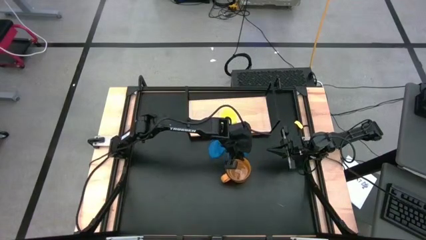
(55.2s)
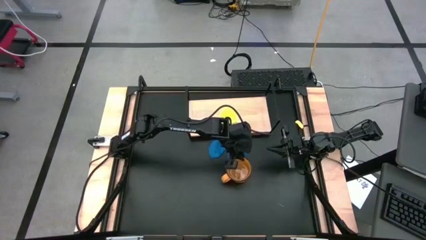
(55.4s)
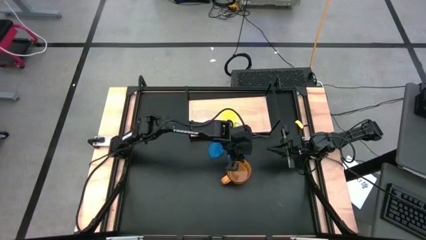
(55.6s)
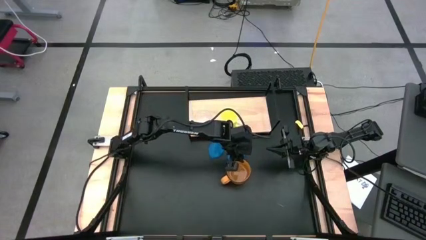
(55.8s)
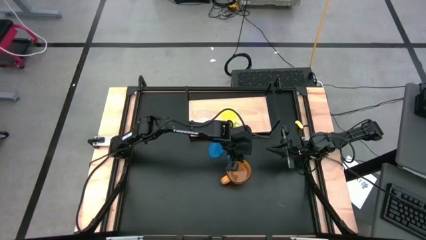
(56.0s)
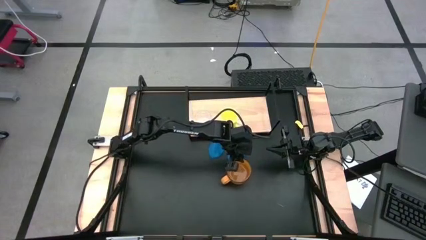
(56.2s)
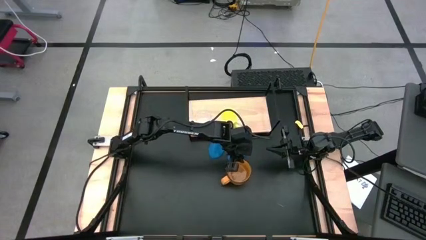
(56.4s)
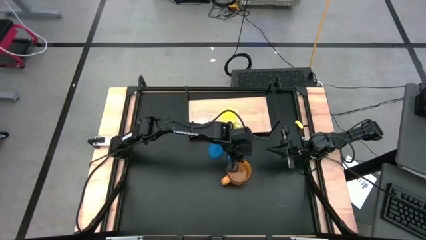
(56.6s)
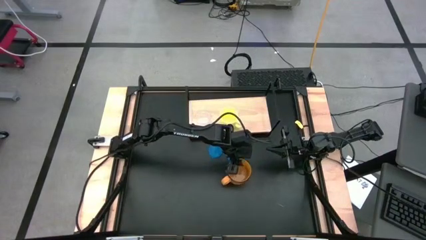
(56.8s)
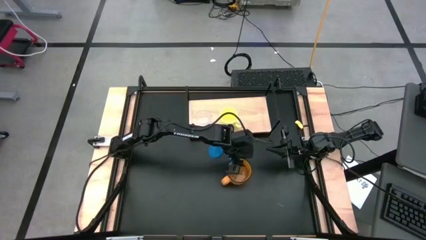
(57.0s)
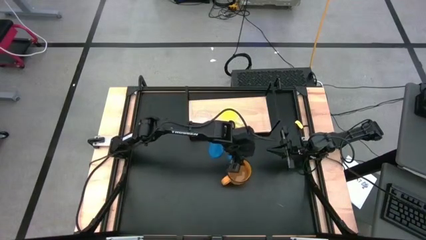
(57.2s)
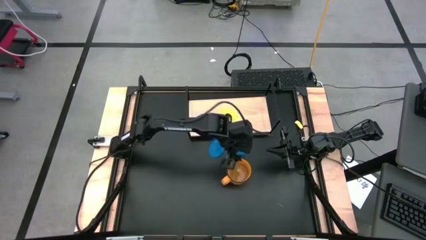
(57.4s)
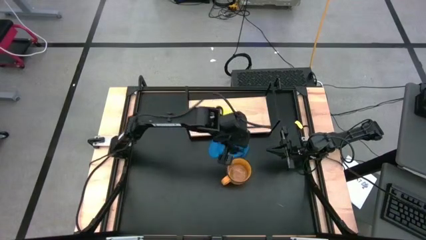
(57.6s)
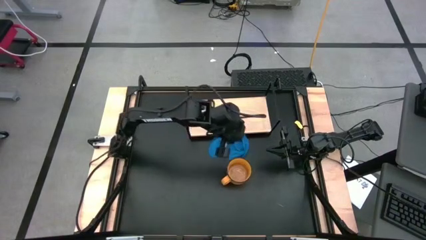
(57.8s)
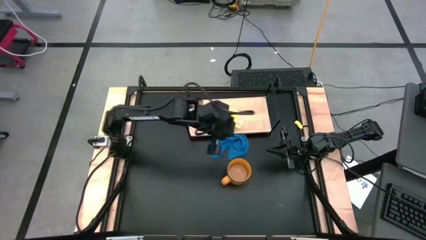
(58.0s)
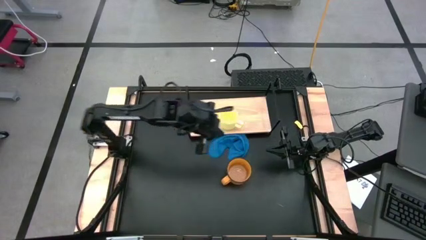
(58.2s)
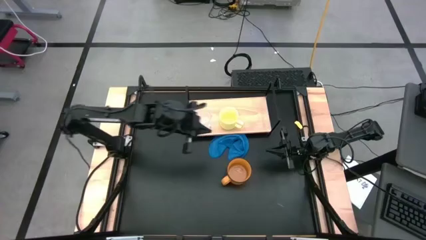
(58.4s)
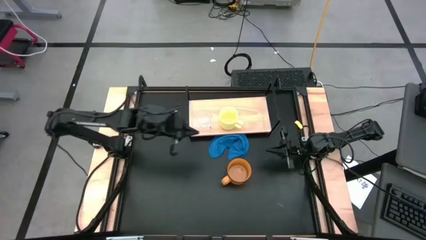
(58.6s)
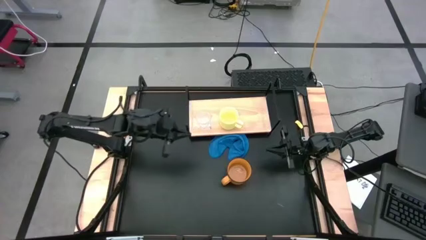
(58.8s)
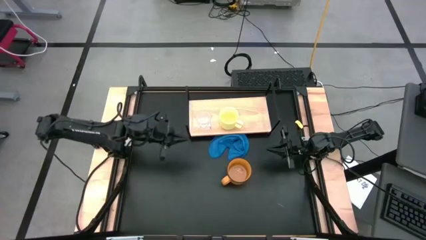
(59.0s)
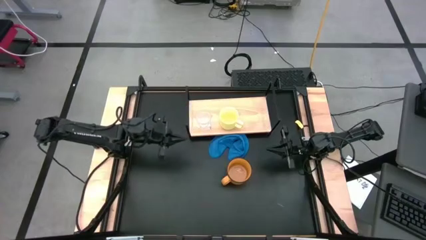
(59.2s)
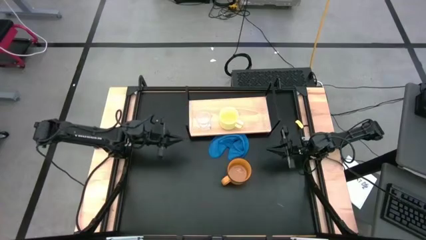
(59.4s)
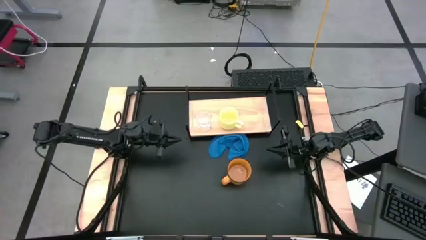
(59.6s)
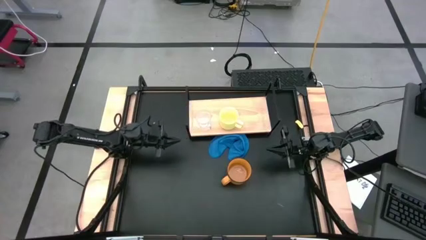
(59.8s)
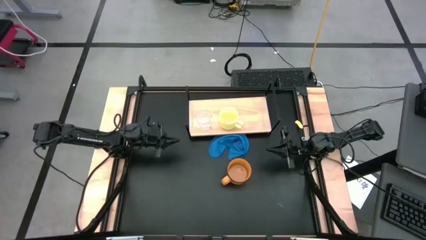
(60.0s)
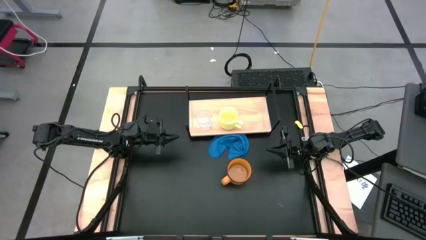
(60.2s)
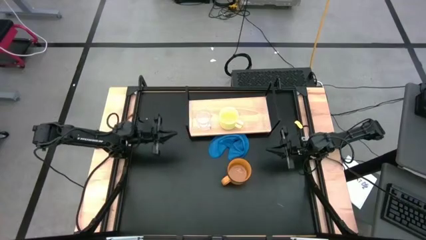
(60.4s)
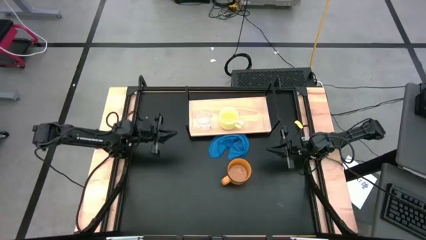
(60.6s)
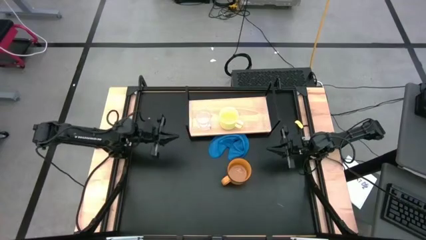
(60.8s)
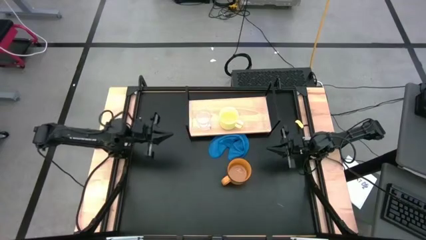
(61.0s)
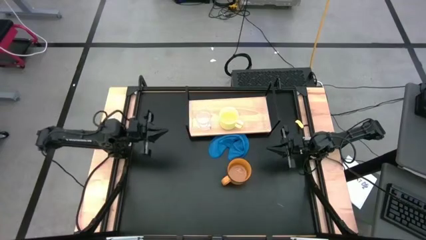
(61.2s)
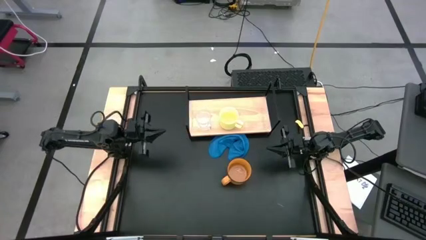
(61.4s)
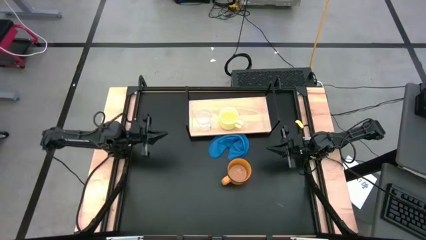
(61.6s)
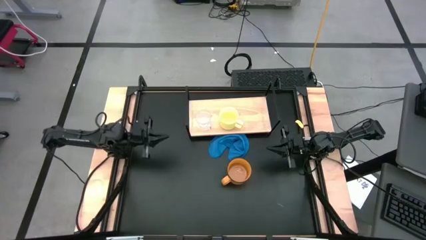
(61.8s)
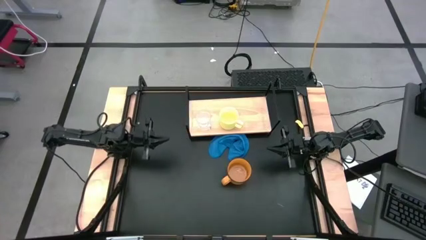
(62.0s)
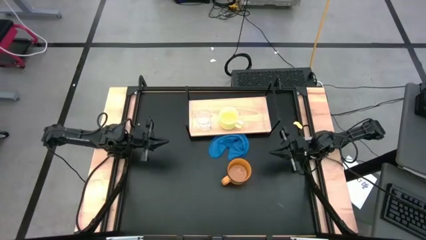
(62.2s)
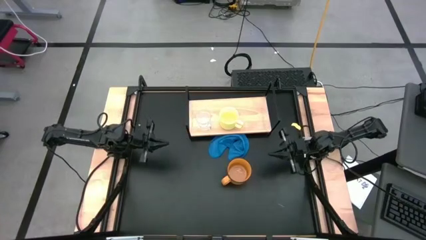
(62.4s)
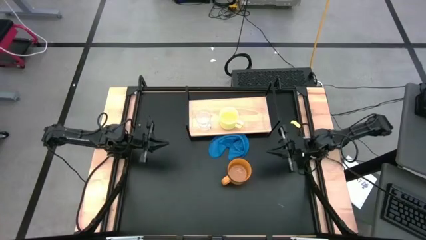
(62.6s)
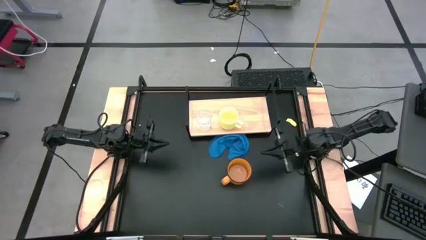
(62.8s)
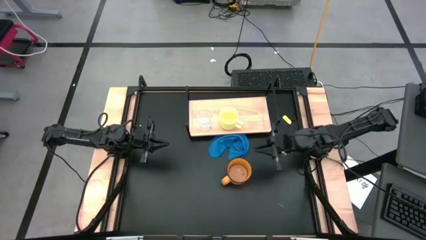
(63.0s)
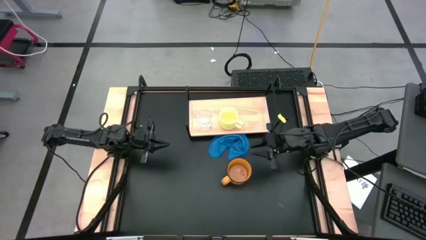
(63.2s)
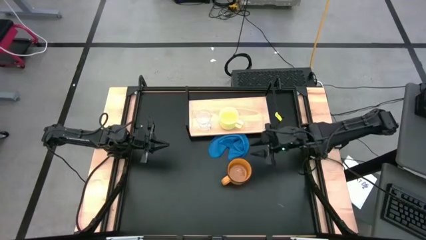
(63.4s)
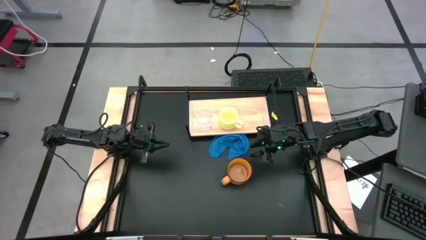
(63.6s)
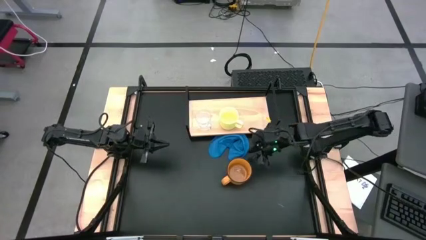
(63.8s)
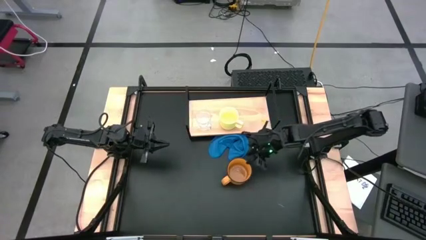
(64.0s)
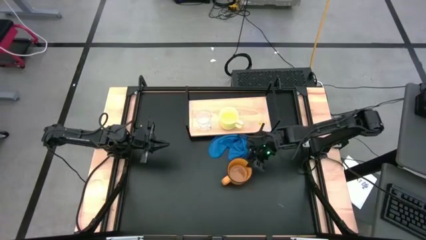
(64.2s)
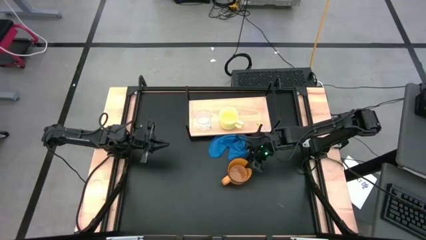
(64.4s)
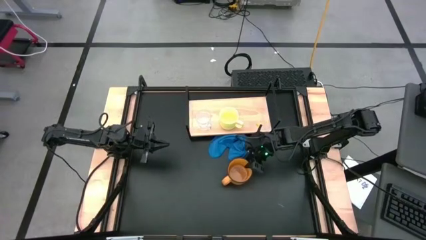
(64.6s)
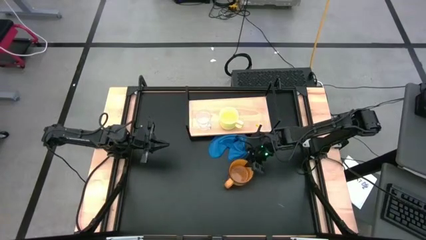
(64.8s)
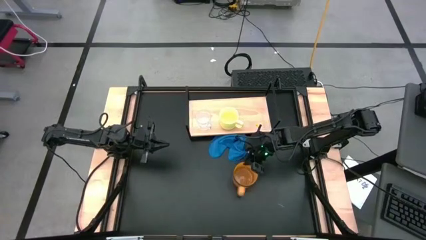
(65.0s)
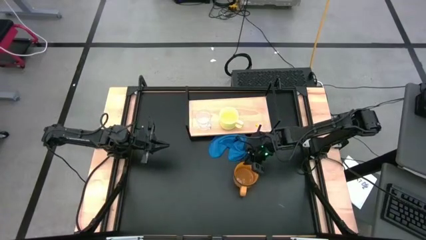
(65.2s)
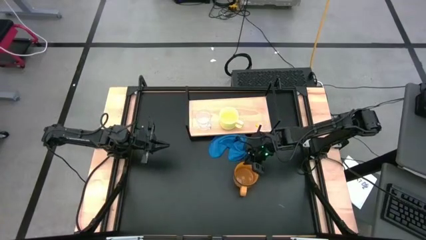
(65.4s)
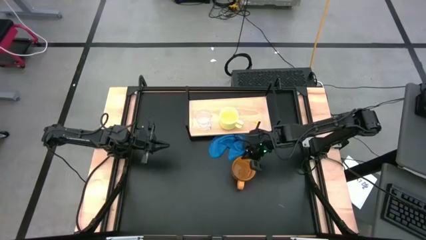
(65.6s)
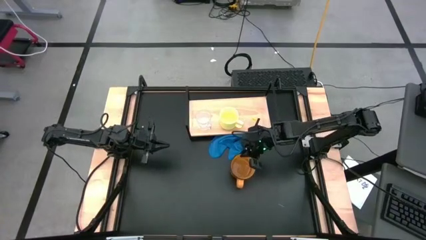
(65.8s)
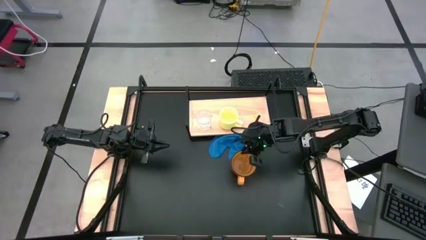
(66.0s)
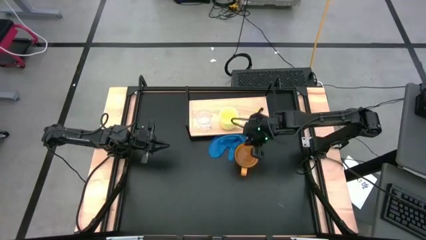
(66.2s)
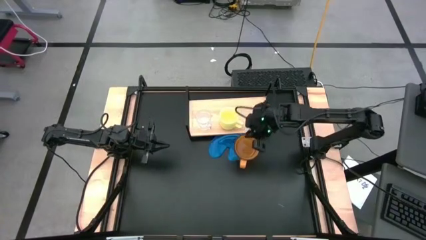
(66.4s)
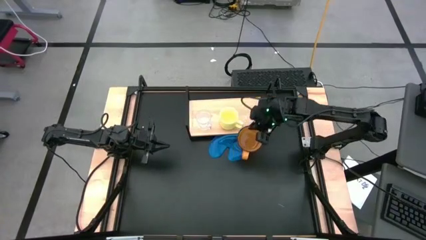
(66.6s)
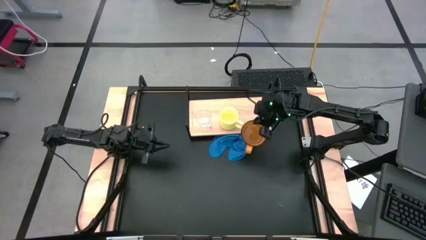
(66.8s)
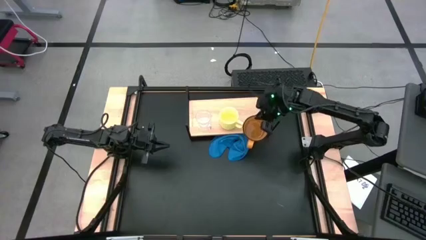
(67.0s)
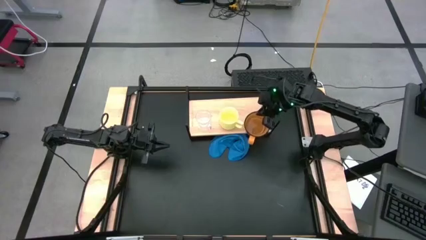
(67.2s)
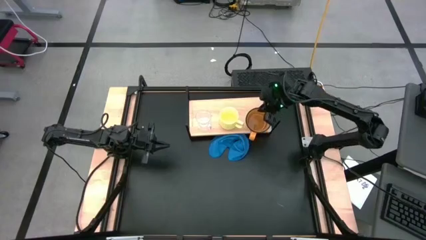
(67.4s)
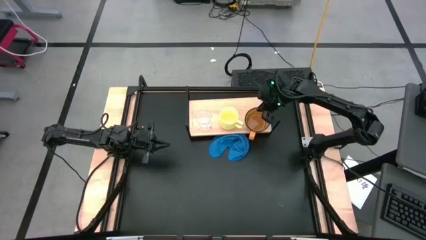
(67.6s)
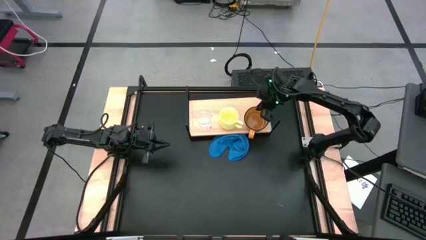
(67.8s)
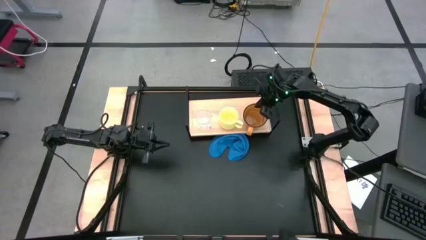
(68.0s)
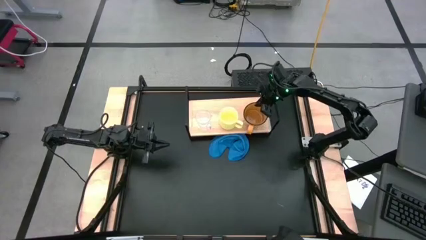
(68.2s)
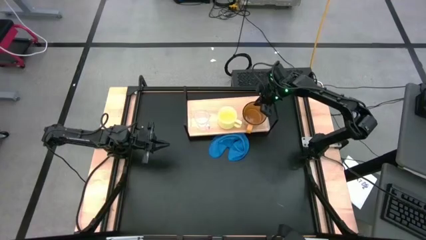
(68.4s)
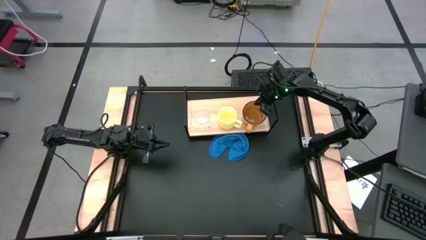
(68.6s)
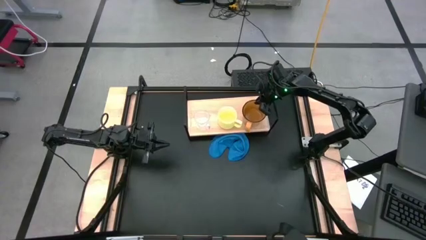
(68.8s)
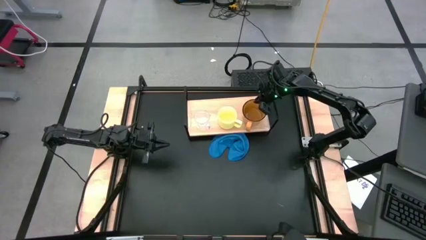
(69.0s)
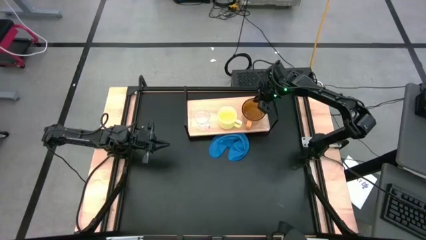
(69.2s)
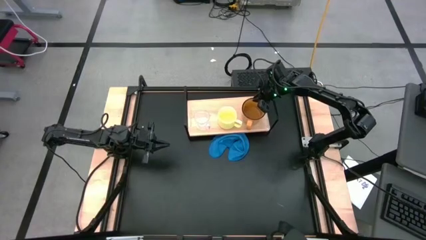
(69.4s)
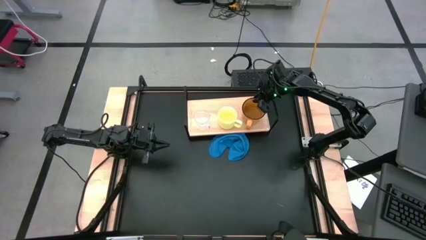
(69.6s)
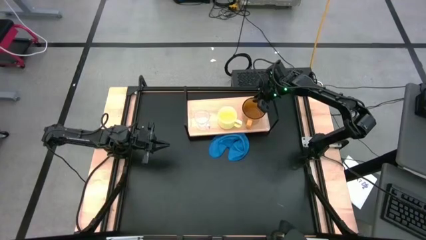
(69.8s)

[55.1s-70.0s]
Task: Stack small to large cups/mugs on shelf
Put the orange mug on the shelf

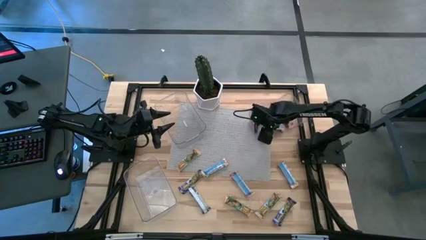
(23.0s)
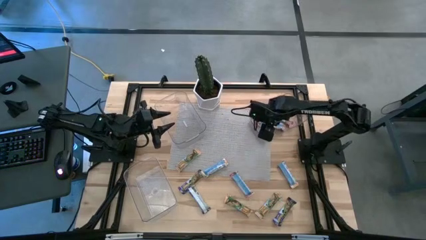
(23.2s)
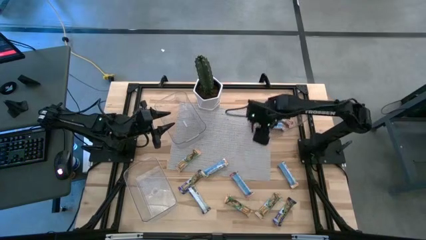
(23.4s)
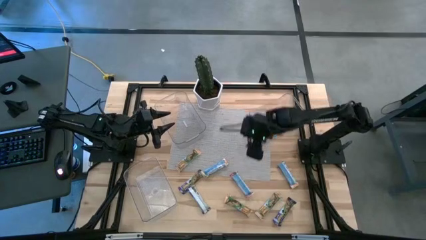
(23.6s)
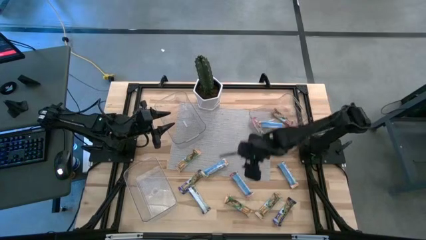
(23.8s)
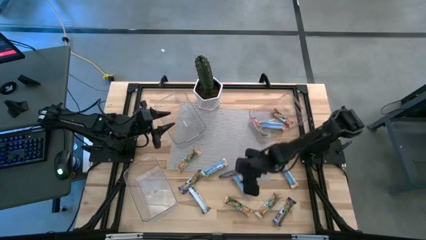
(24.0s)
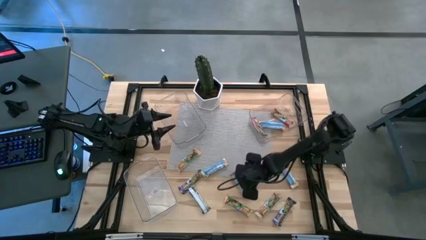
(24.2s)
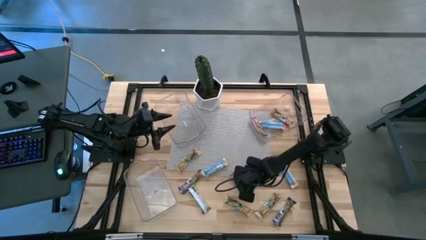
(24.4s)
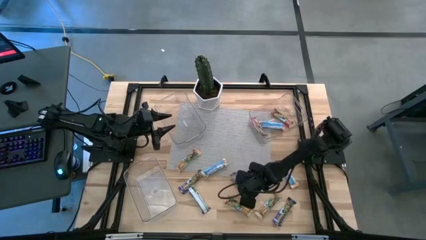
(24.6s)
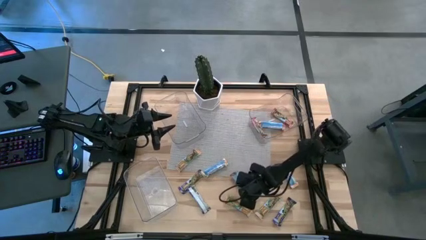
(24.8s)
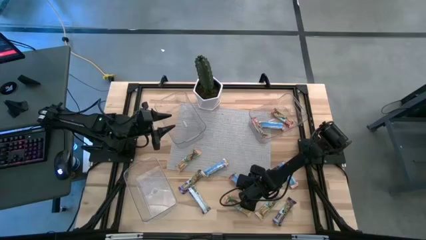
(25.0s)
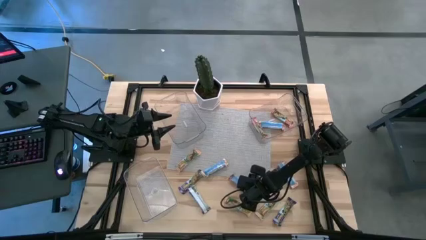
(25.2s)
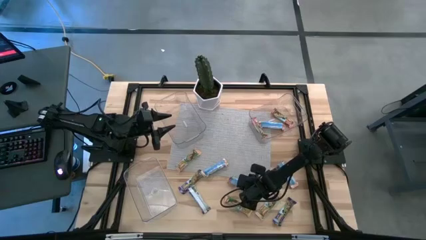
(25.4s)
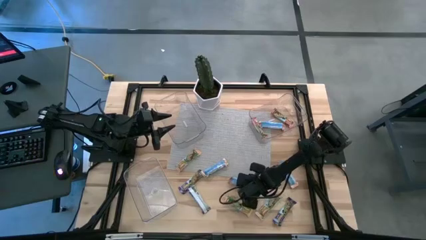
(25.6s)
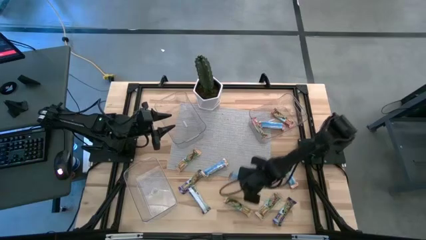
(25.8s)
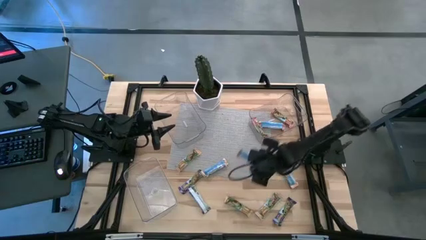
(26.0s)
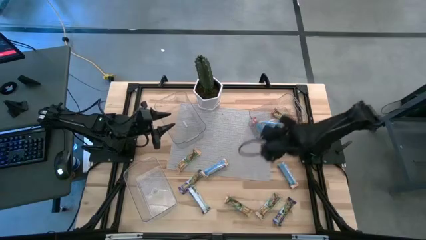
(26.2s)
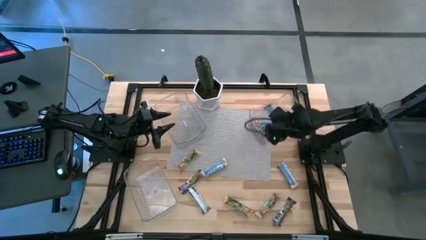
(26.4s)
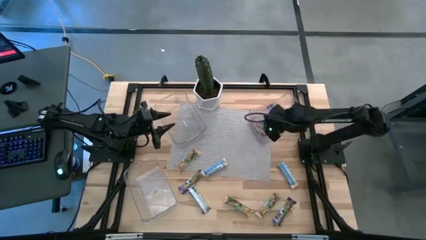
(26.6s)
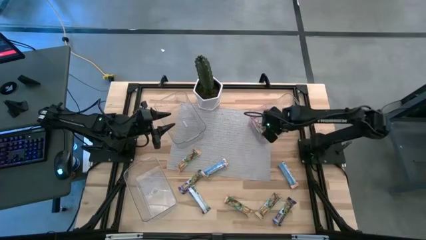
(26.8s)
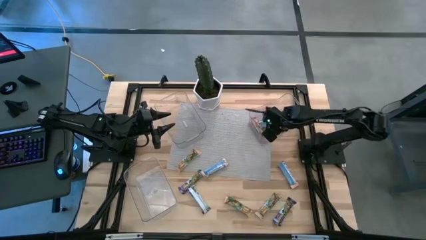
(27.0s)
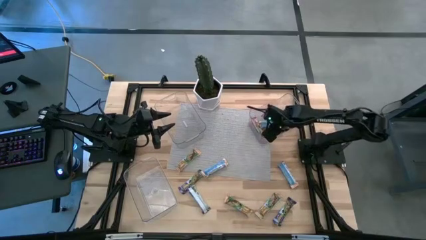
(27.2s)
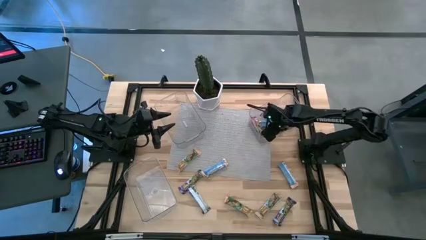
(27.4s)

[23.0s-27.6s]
Task: Pick and place Granola Bars by type
Put the red granola bar into the top right transparent bin
